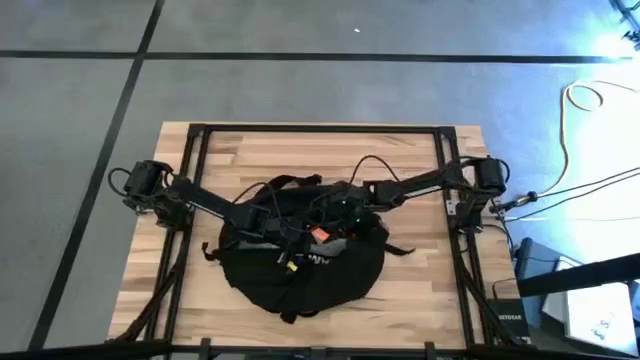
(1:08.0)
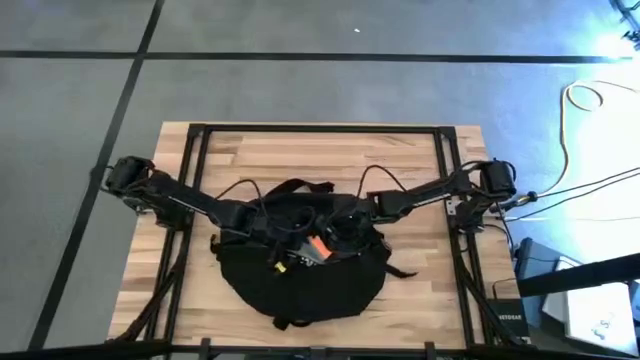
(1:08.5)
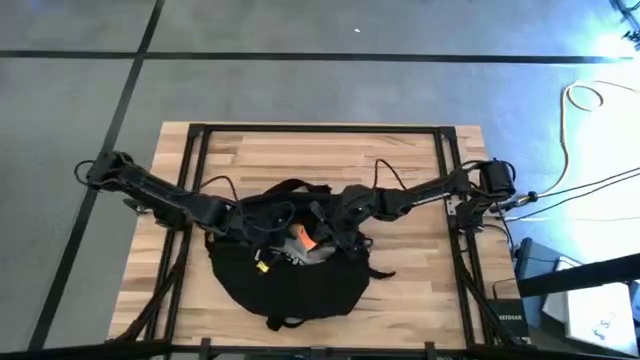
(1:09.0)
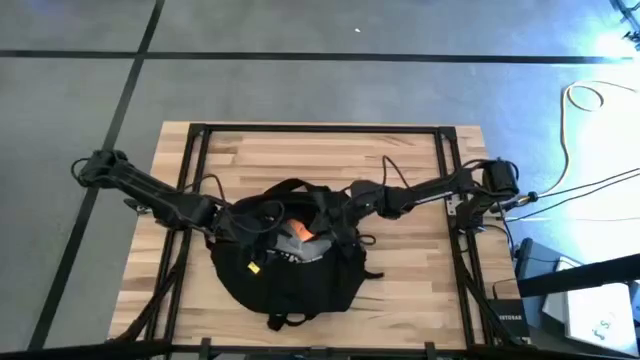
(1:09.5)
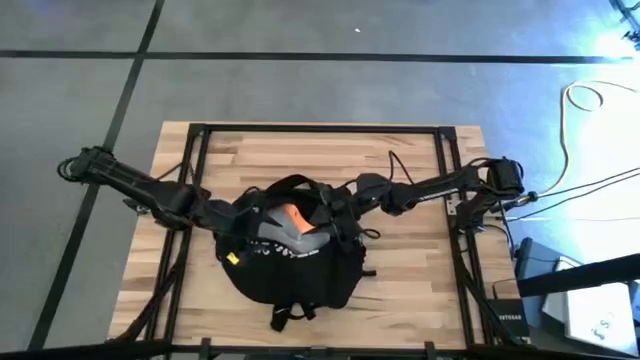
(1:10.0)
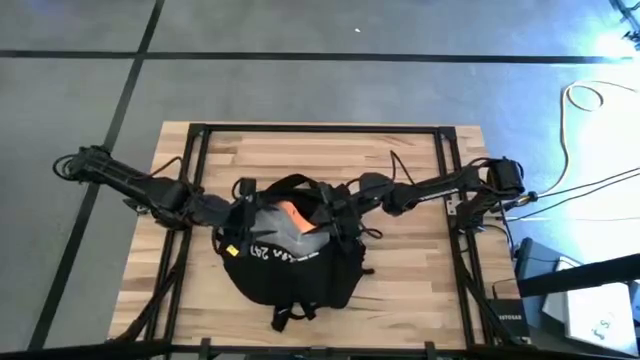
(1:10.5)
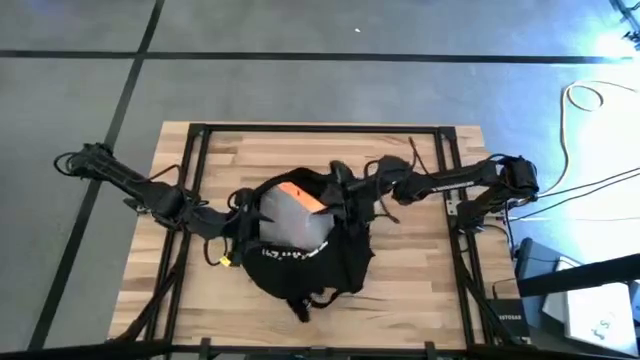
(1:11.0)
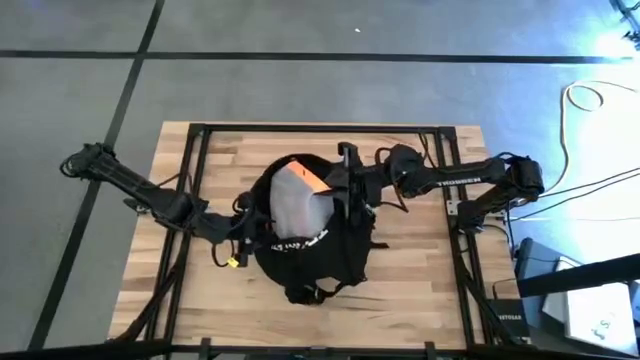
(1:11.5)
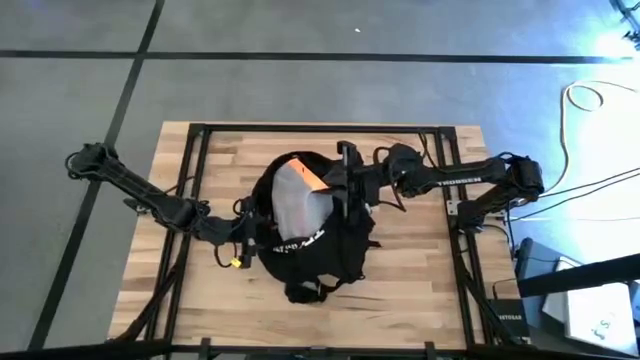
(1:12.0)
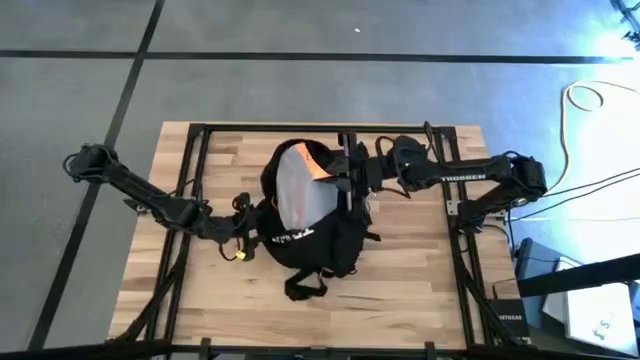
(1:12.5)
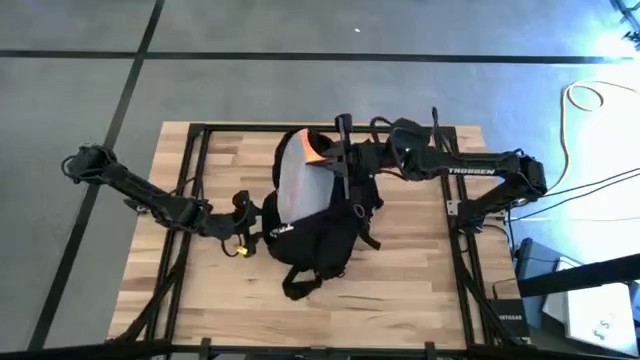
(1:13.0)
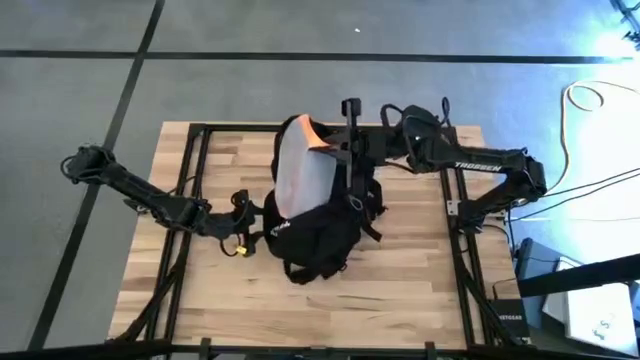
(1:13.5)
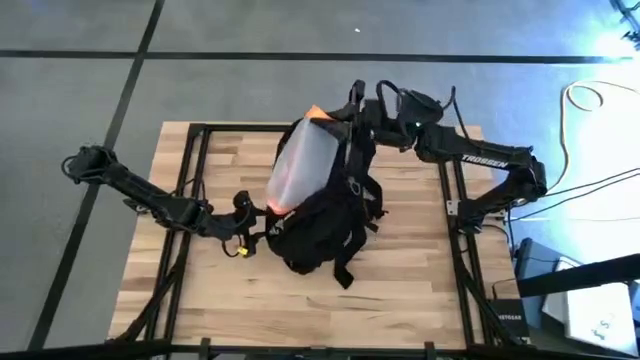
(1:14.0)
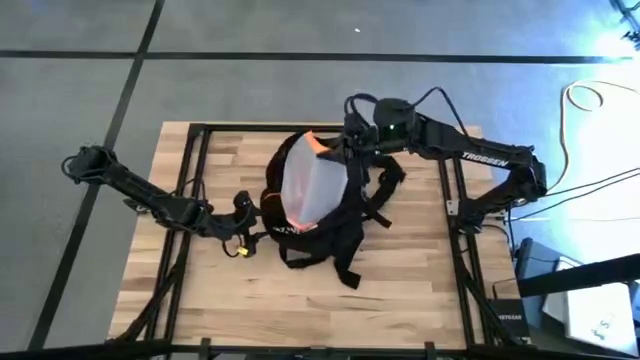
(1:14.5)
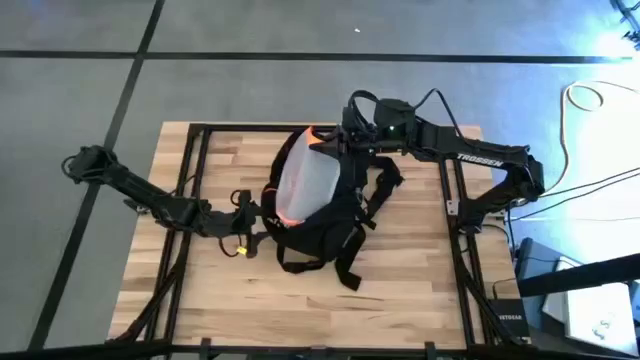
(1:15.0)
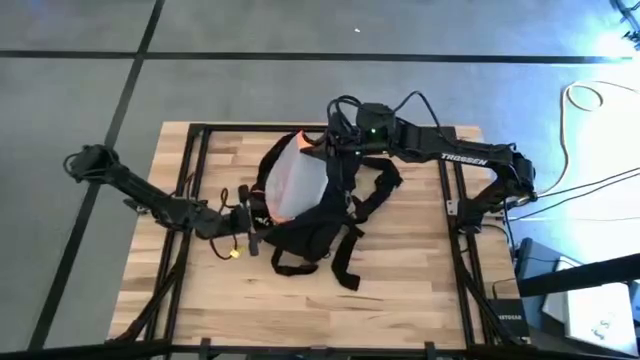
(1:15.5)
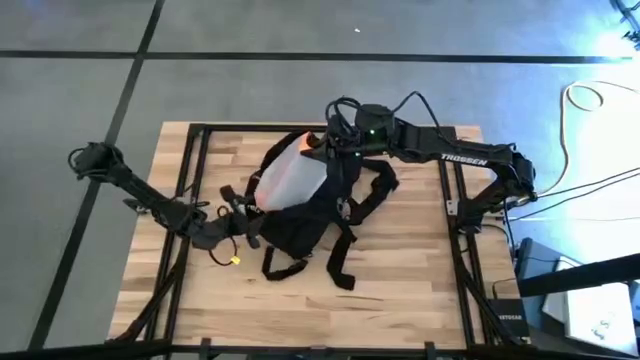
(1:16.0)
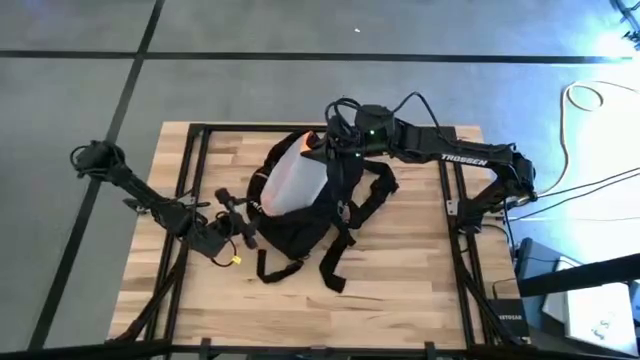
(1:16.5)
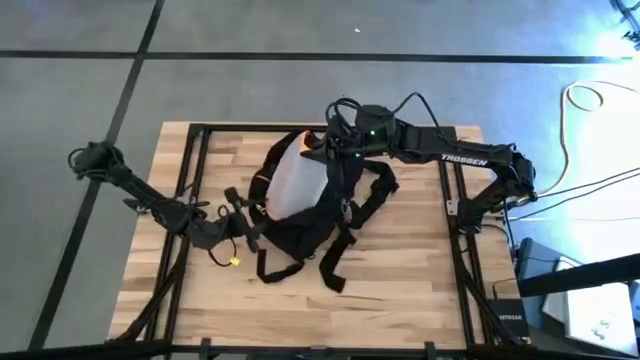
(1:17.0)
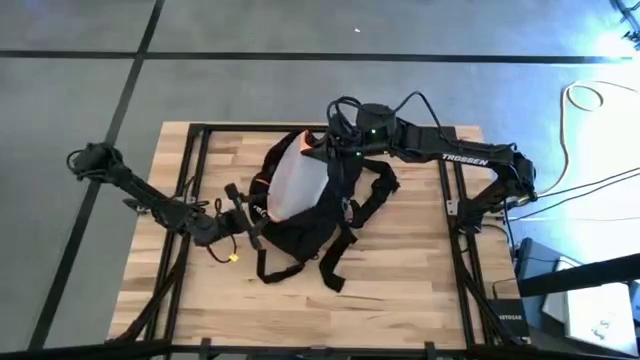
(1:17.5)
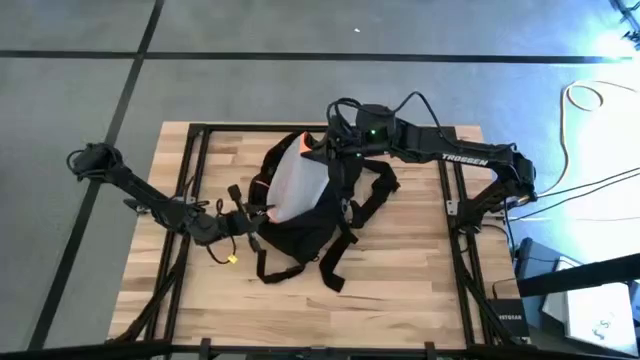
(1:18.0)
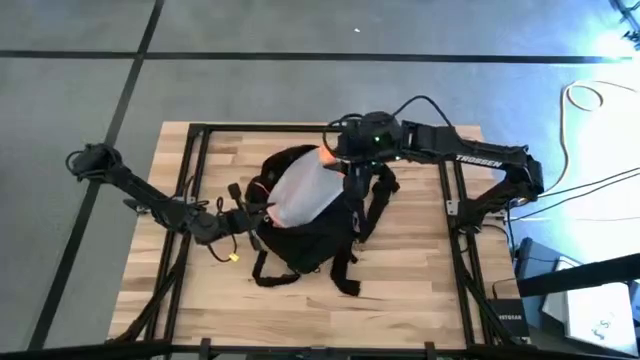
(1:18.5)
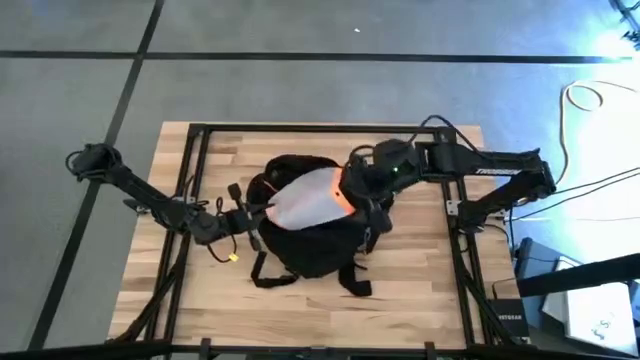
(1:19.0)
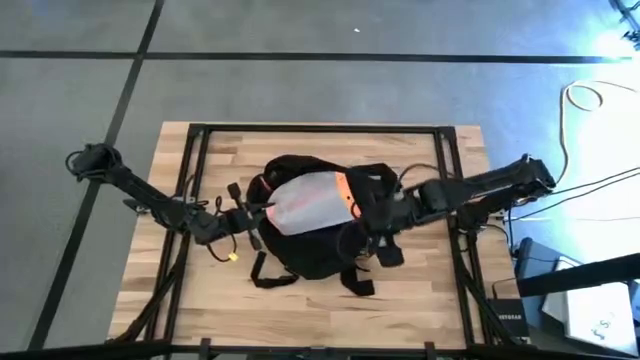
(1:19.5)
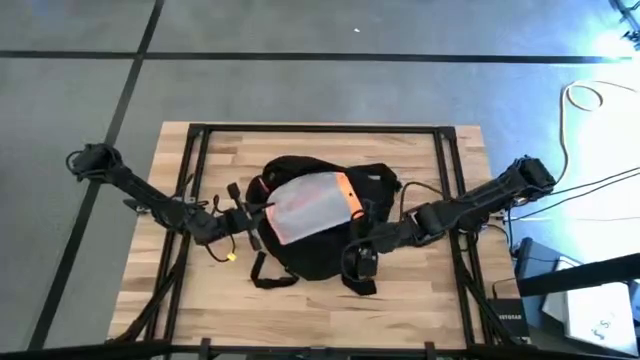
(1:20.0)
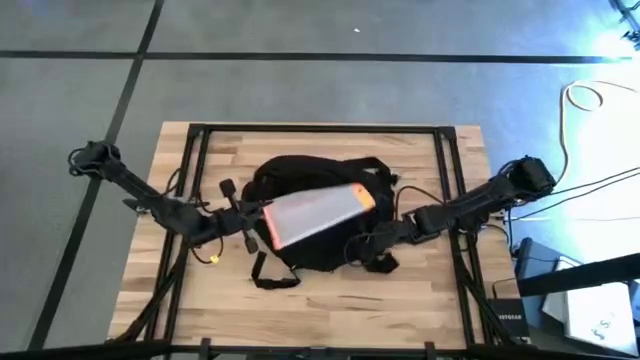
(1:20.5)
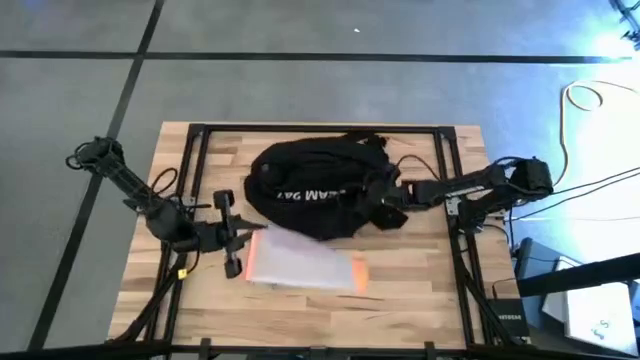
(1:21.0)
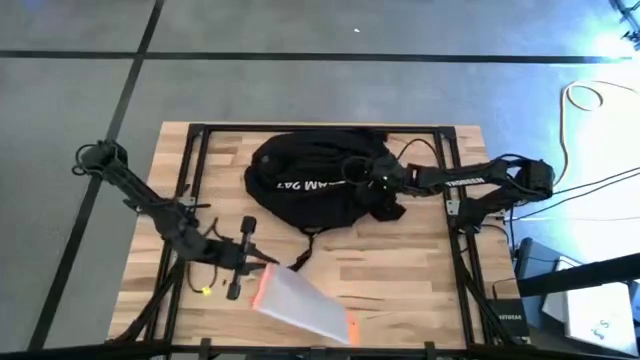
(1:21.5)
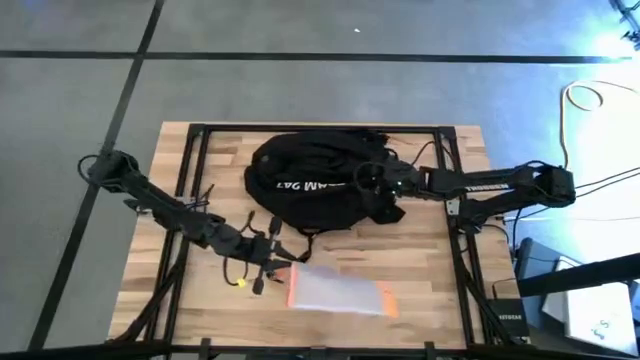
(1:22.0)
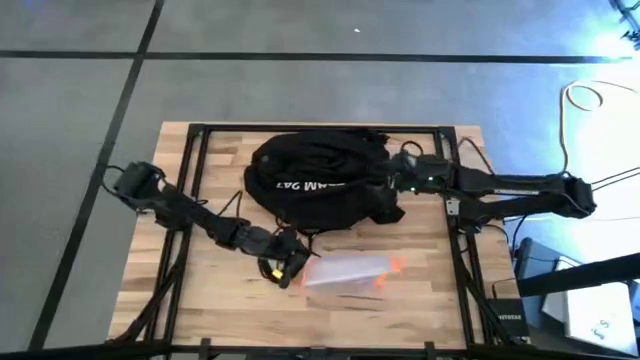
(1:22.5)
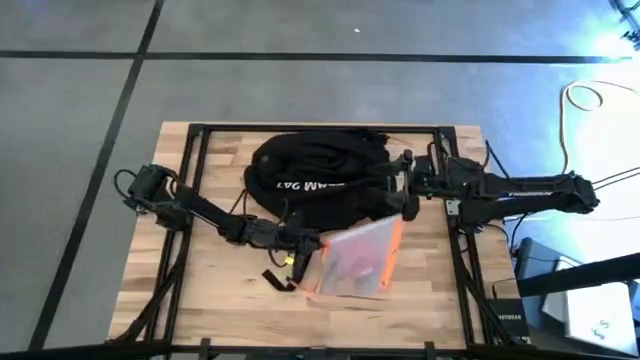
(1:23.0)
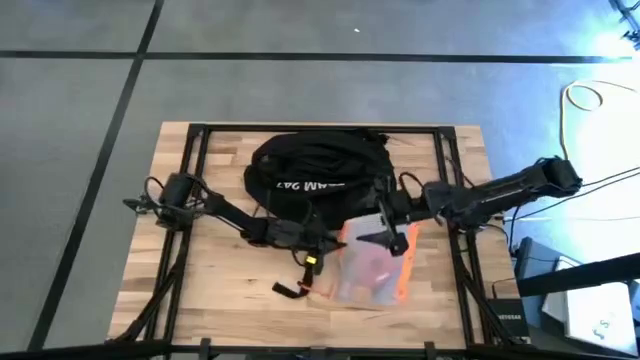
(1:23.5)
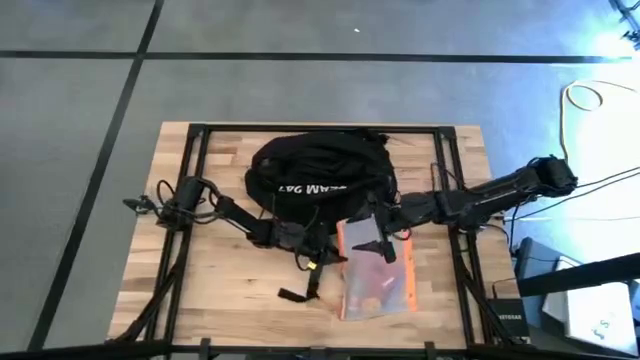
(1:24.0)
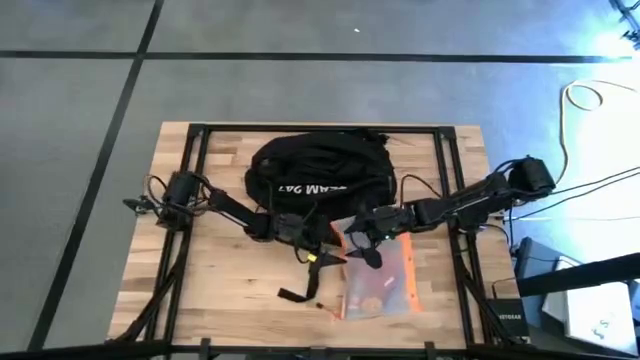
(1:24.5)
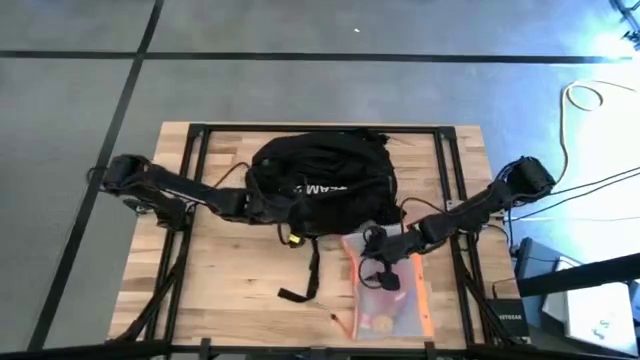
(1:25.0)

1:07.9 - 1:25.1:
Task: Unpack backpack
Remove the transparent white zip bag from the black backpack

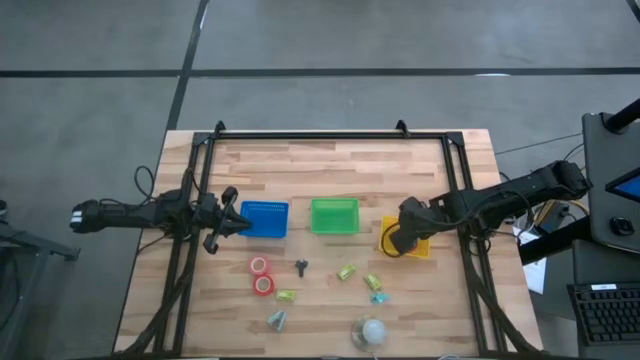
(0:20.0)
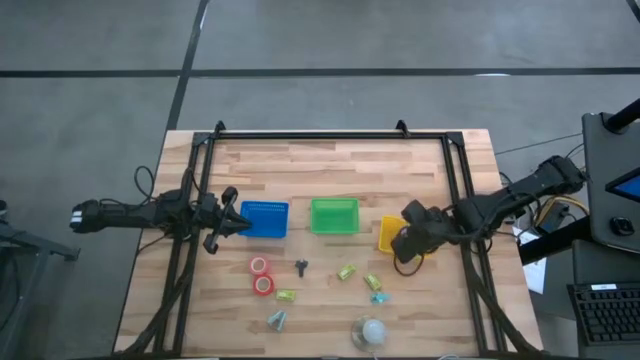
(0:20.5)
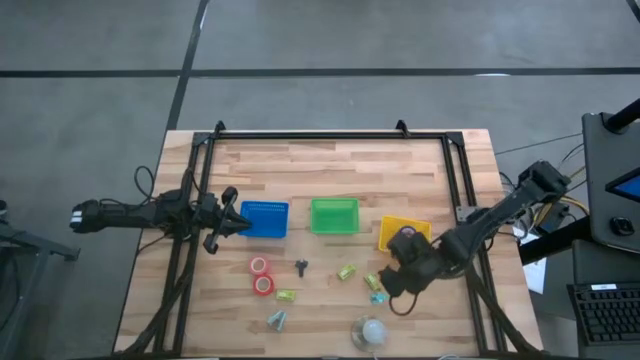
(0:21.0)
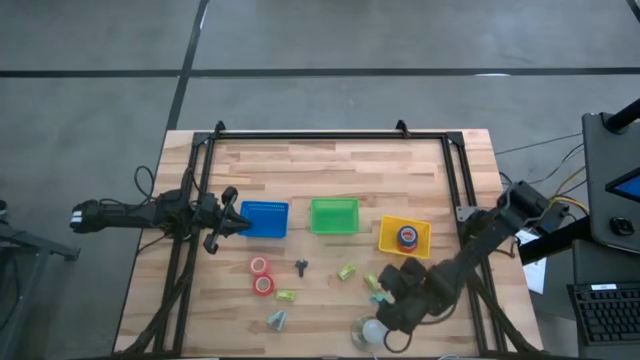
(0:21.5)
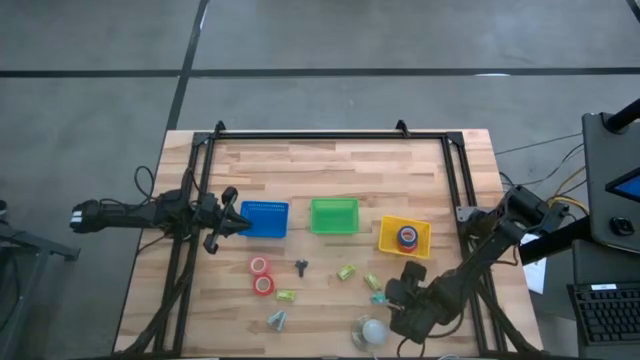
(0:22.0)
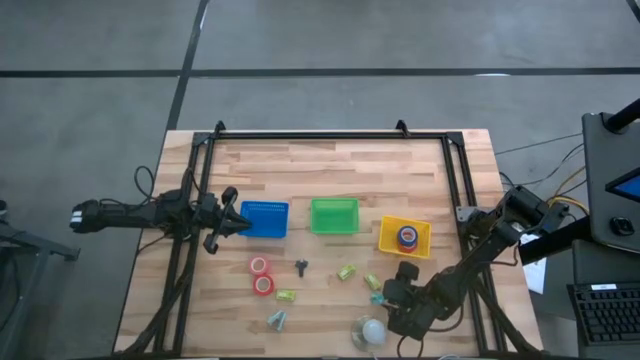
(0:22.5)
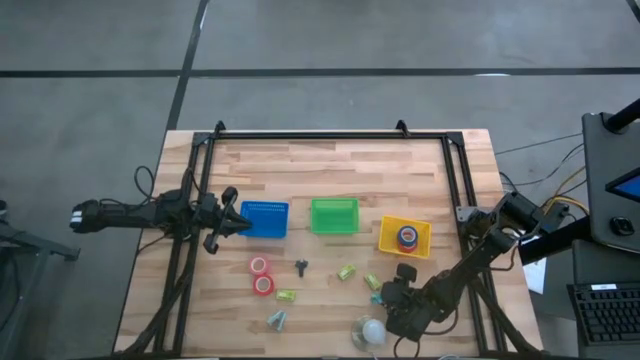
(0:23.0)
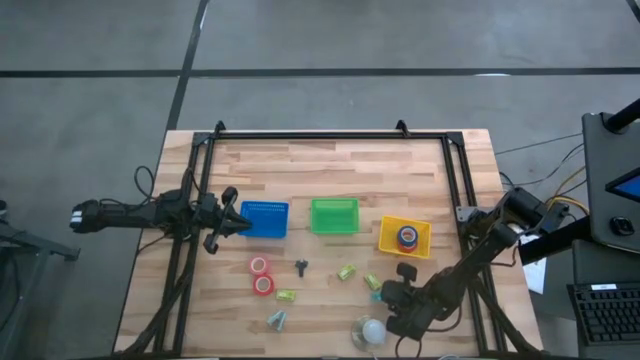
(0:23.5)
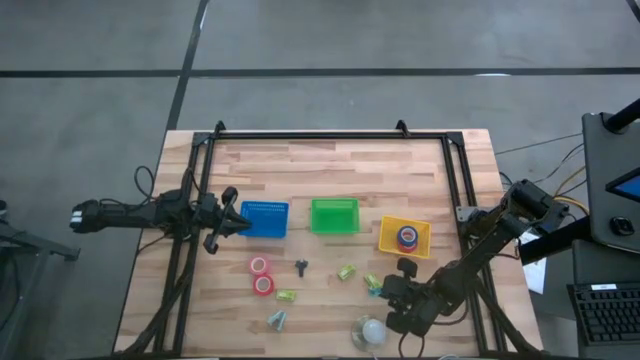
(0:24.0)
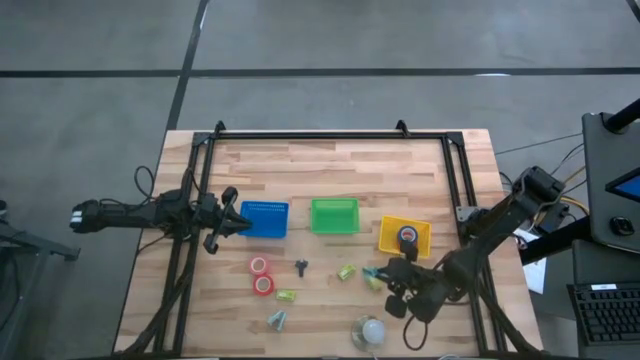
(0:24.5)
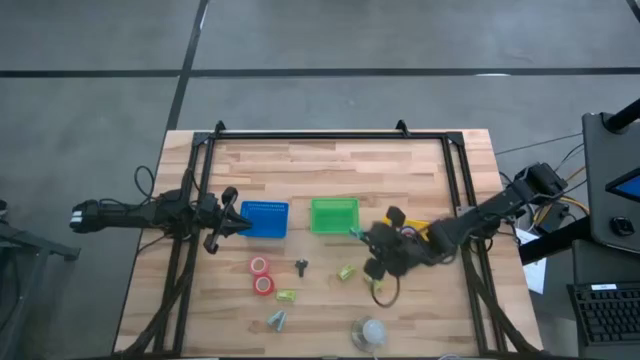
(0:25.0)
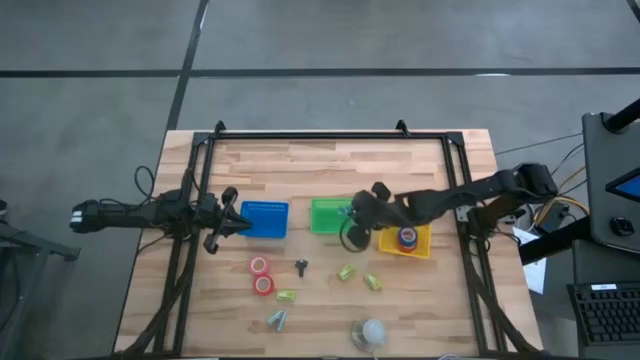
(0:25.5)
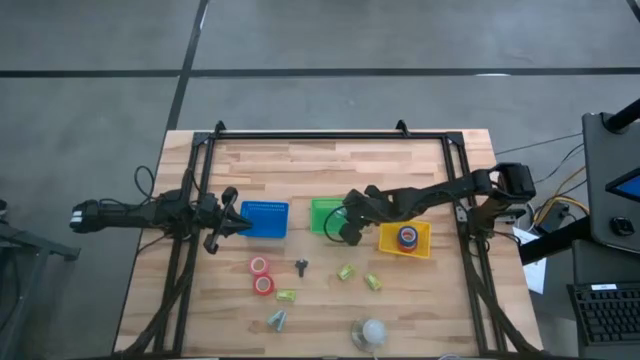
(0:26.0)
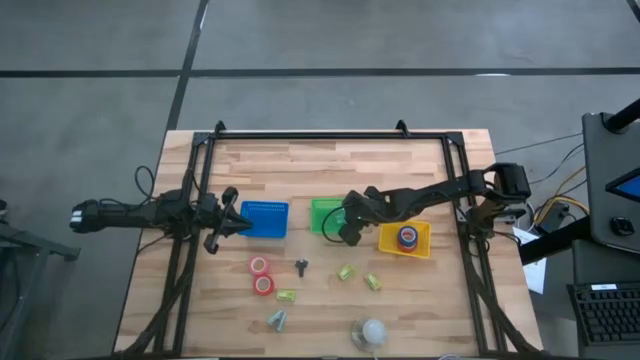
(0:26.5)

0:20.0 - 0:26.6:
Task: Pick and place Stapler, Stapler remover, tape
Put the light blue staple remover into the green bin
